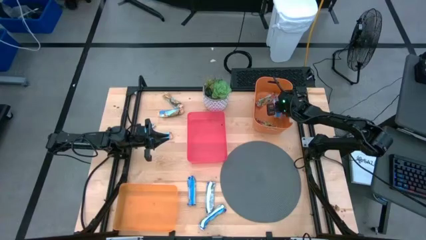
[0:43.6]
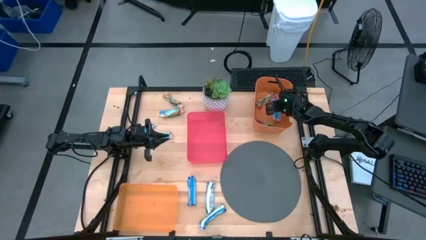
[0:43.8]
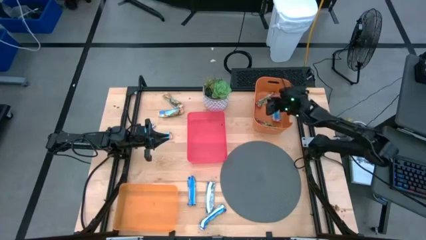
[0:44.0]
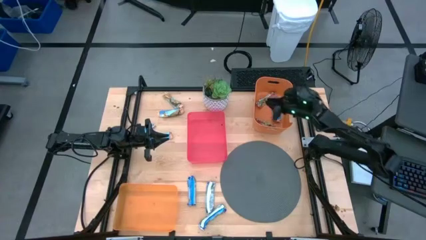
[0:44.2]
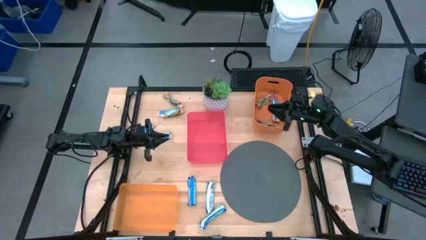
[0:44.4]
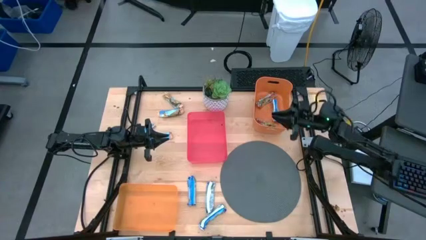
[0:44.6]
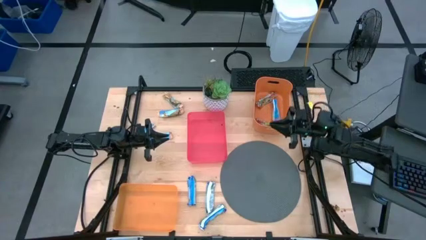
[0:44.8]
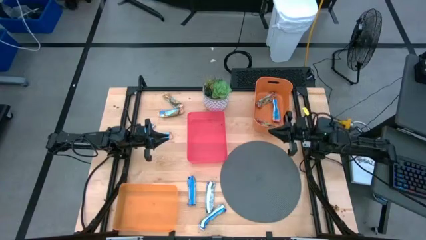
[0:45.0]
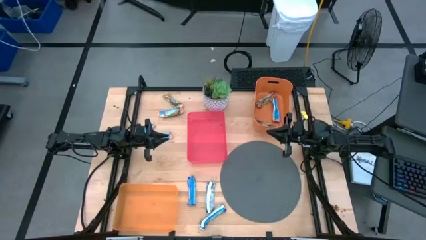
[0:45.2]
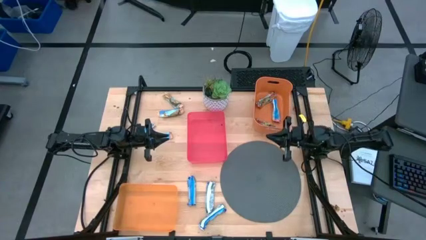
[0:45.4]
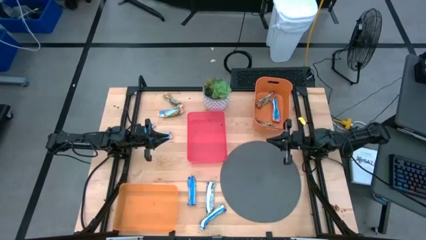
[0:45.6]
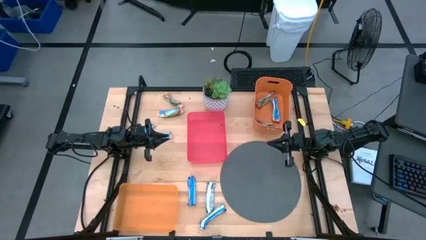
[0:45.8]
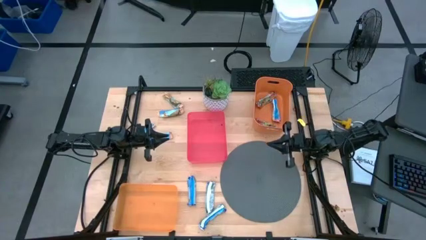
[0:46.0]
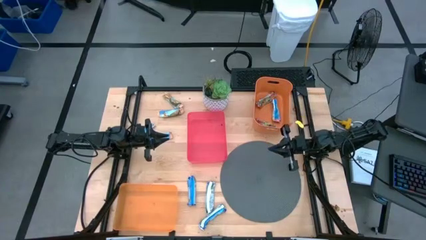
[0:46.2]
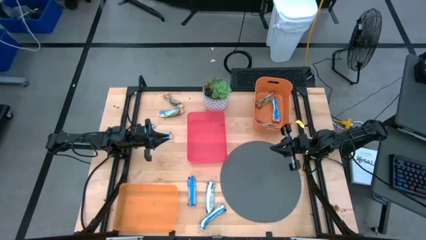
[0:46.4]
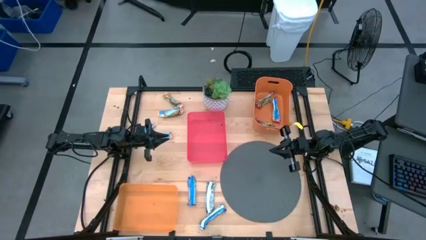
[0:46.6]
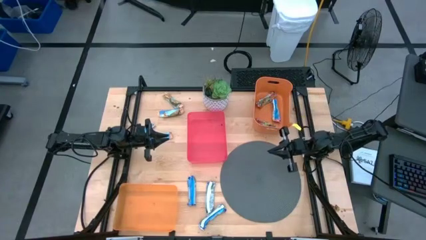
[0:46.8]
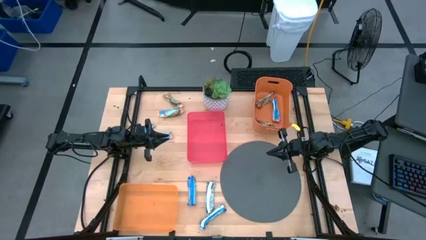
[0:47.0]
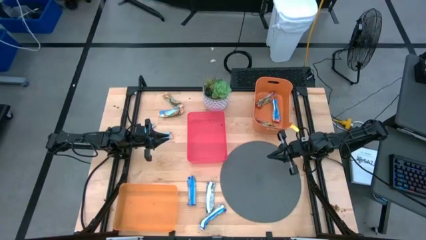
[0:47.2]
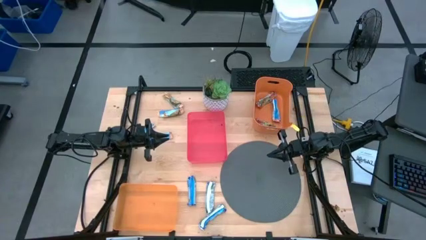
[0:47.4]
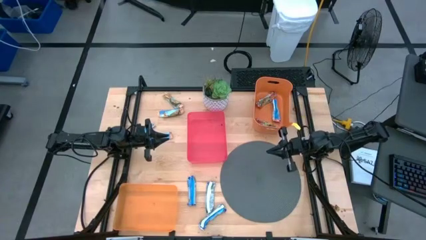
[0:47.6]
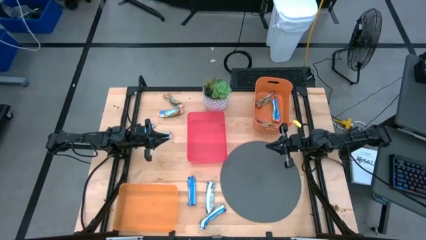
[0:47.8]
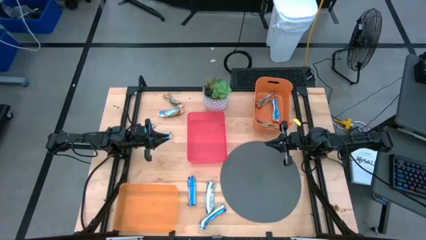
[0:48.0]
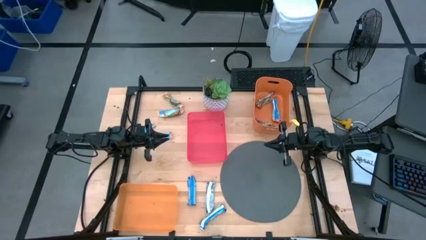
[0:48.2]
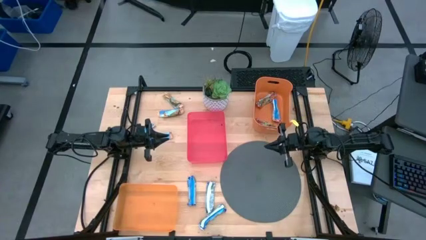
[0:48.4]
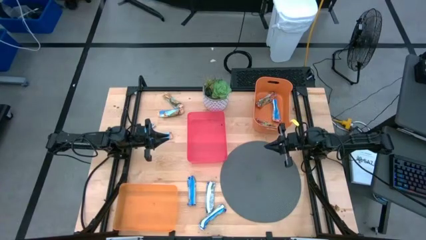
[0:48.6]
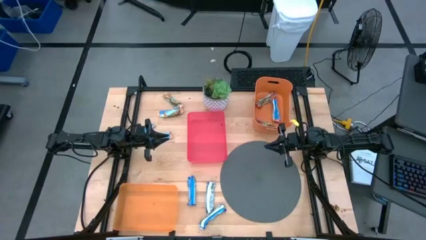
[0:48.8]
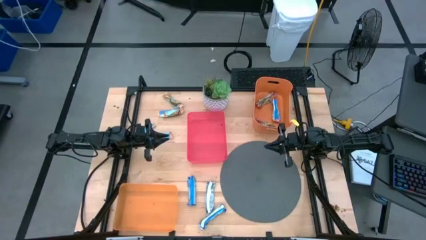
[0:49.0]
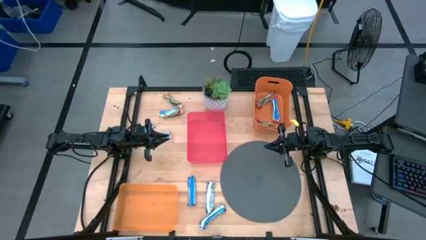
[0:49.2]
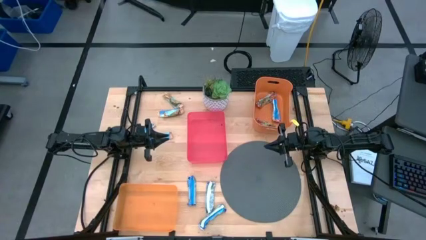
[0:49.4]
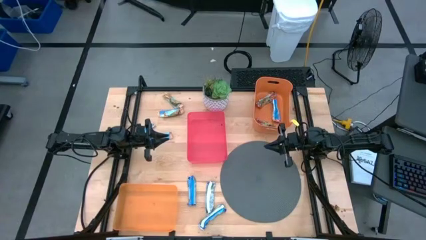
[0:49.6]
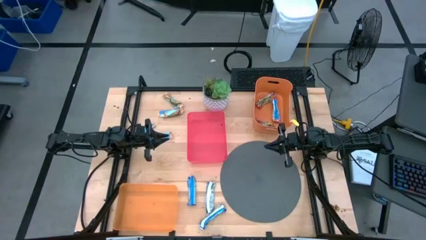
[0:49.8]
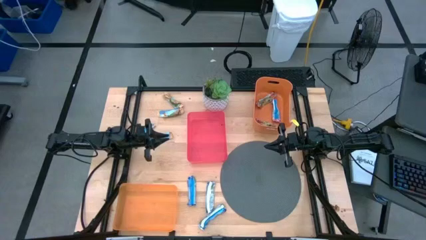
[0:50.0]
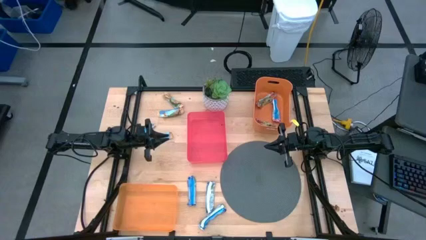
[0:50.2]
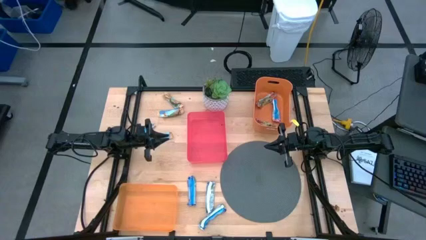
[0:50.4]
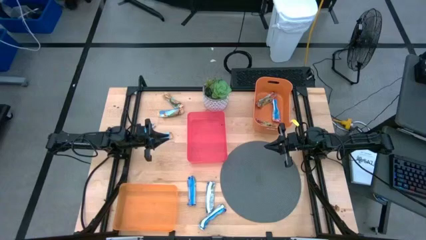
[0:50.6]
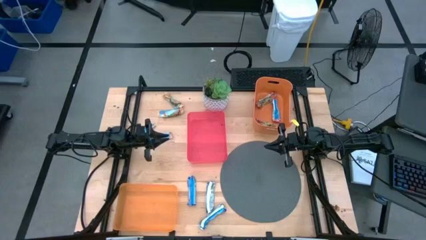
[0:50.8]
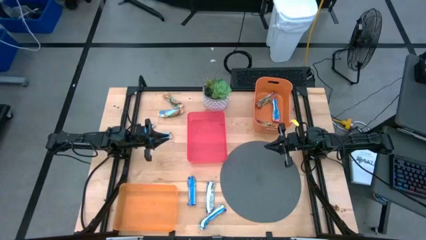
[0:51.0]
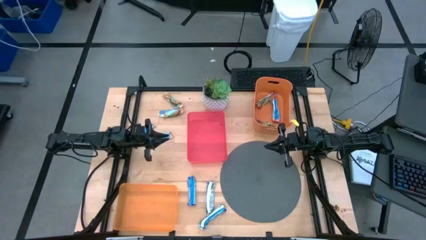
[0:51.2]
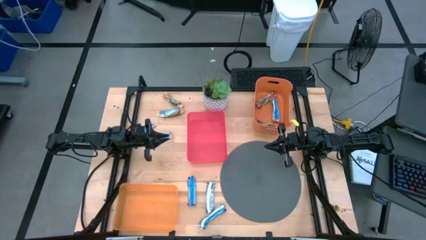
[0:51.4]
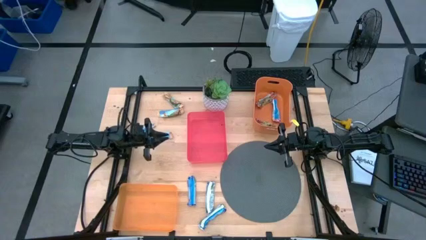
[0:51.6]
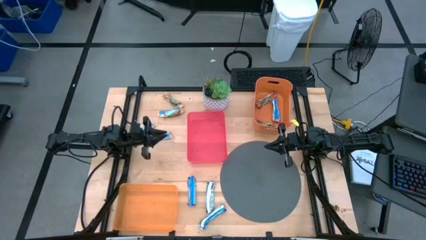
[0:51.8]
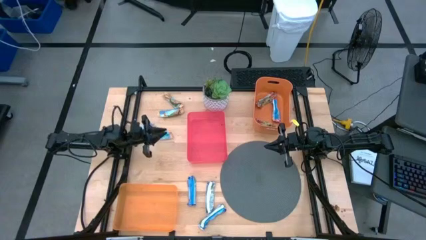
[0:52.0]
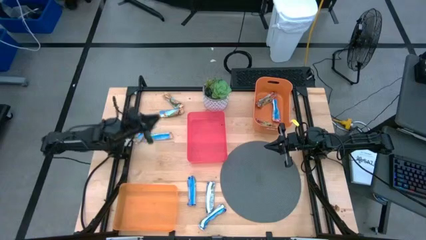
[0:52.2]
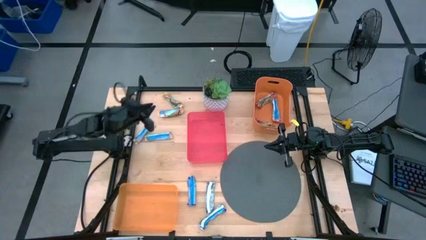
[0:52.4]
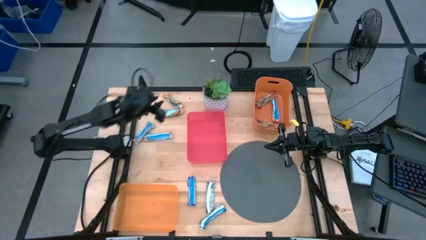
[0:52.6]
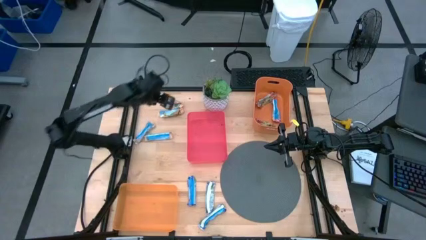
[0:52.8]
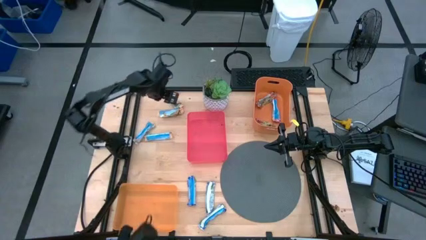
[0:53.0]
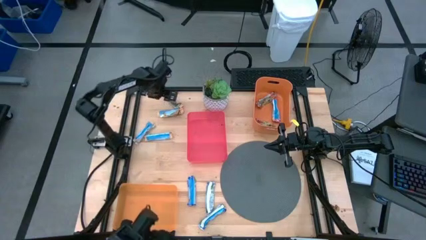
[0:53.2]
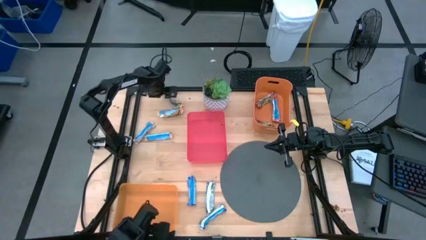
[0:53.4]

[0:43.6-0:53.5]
Task: Pick and place Granola Bars by type
Put the blue/orange granola bar into the pink bin
